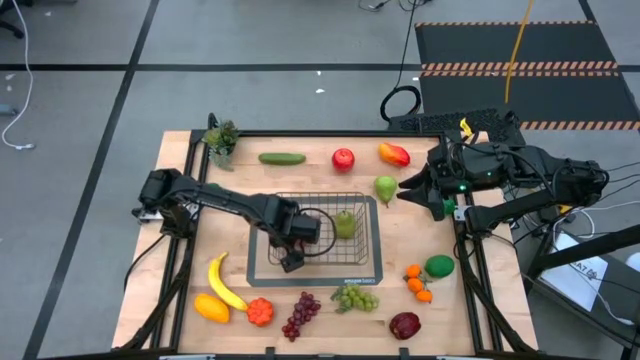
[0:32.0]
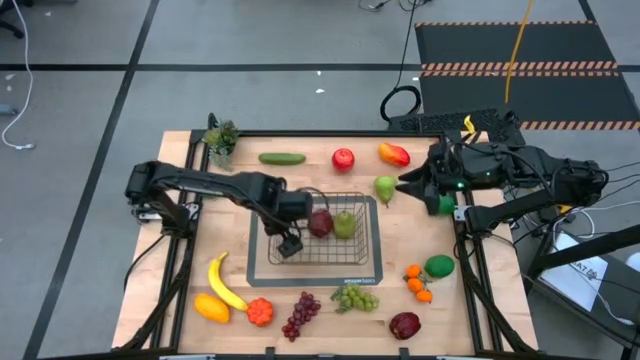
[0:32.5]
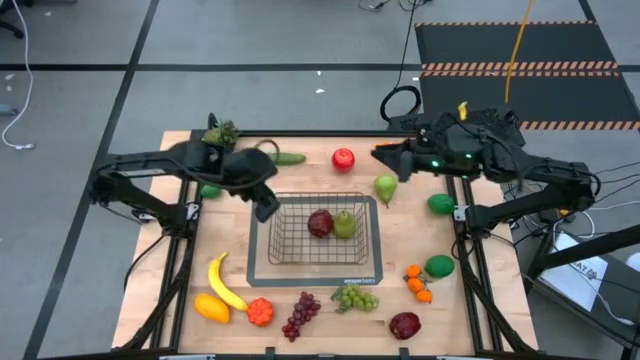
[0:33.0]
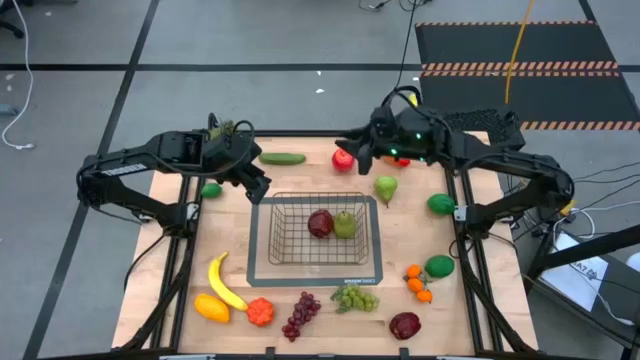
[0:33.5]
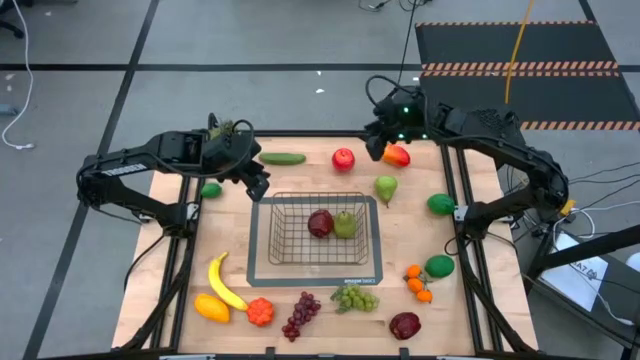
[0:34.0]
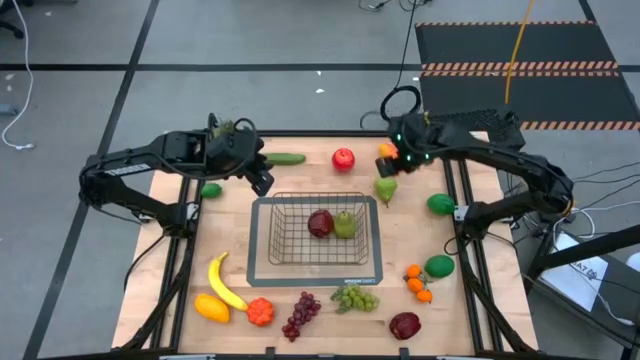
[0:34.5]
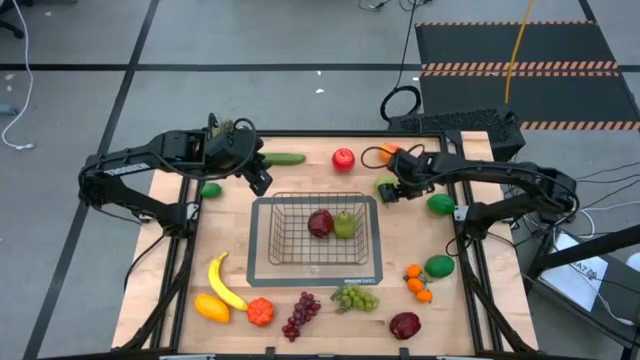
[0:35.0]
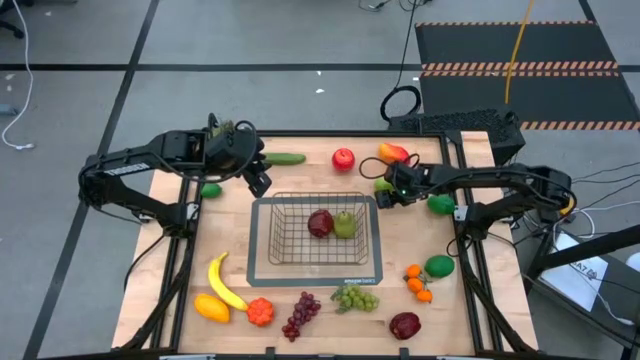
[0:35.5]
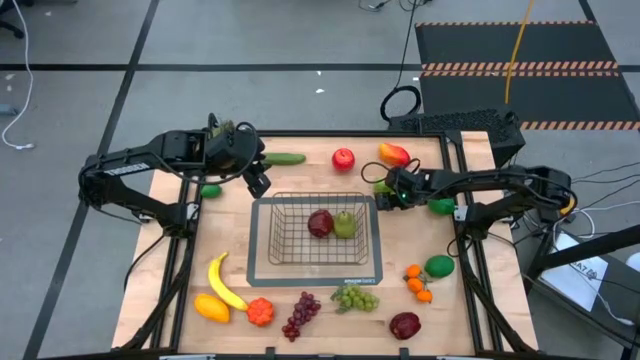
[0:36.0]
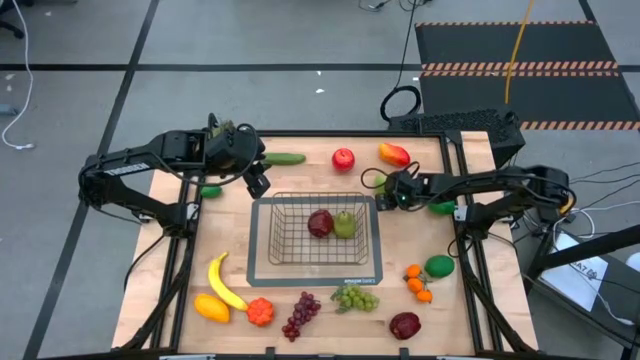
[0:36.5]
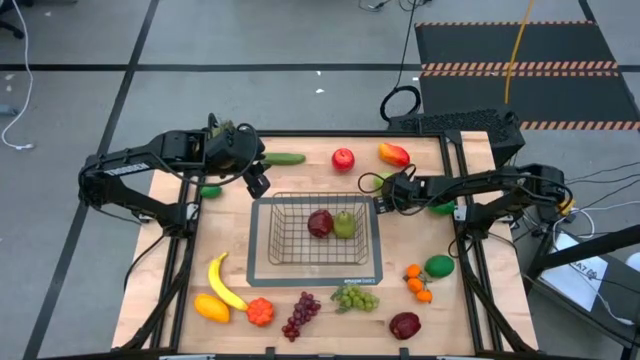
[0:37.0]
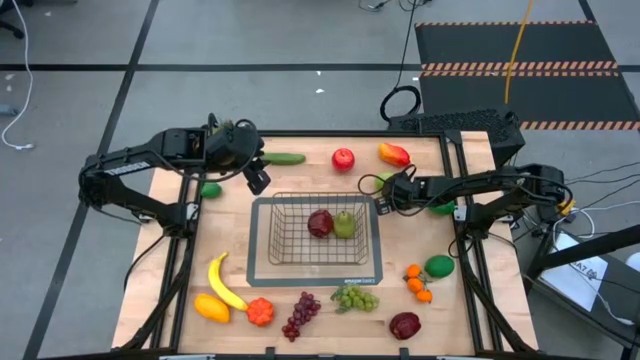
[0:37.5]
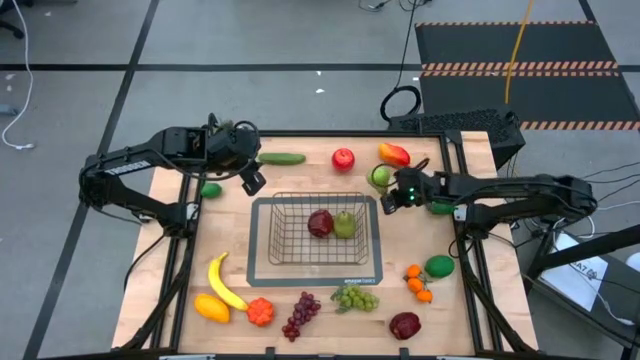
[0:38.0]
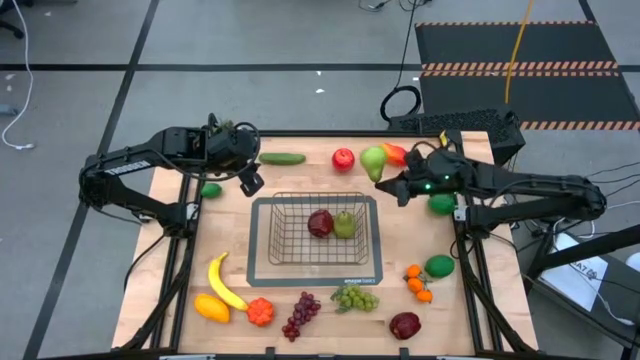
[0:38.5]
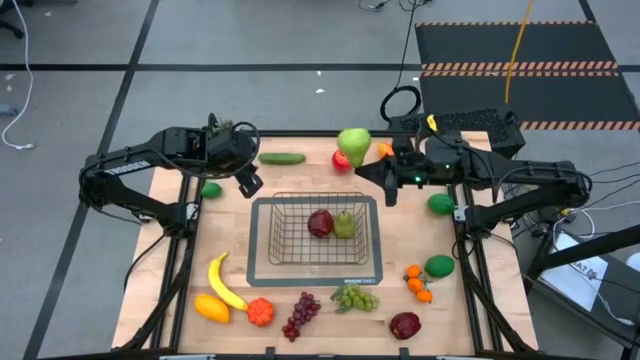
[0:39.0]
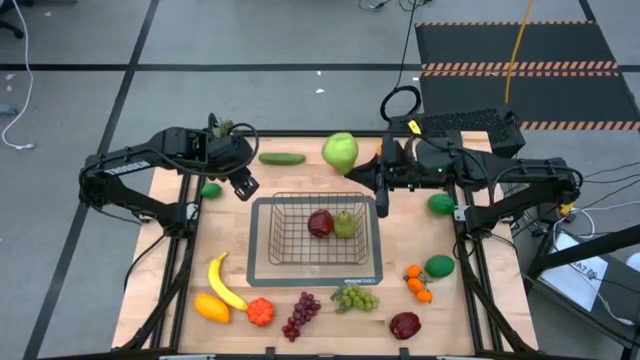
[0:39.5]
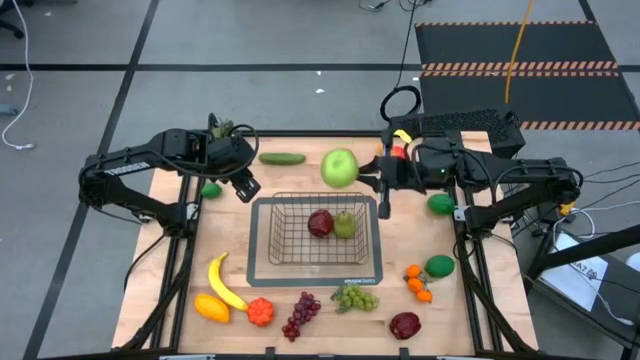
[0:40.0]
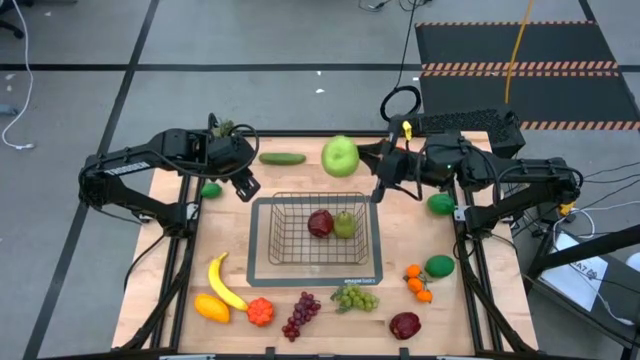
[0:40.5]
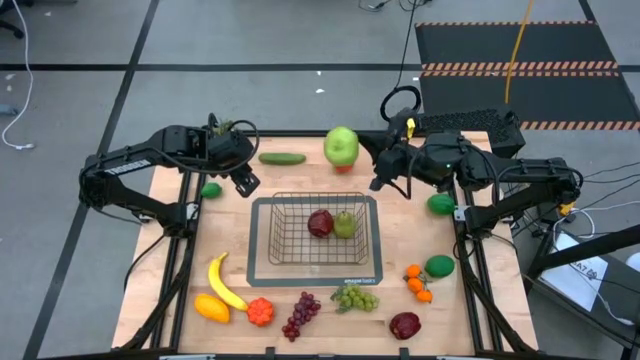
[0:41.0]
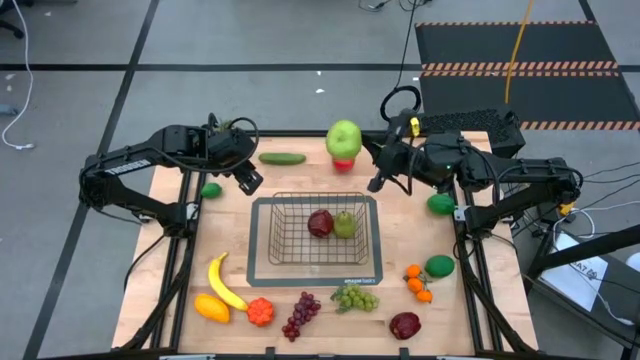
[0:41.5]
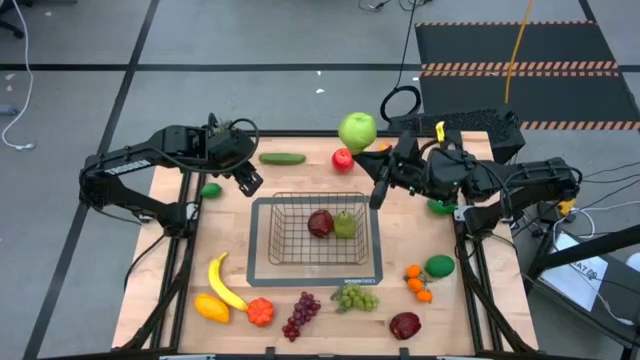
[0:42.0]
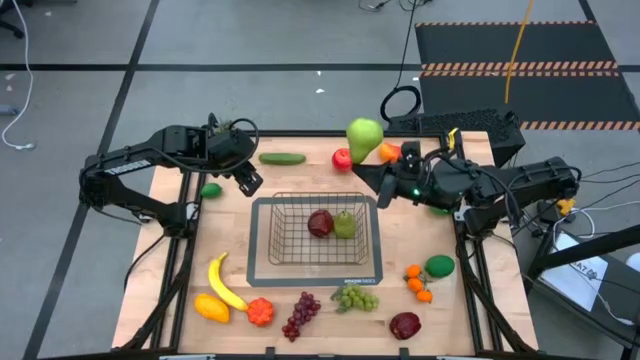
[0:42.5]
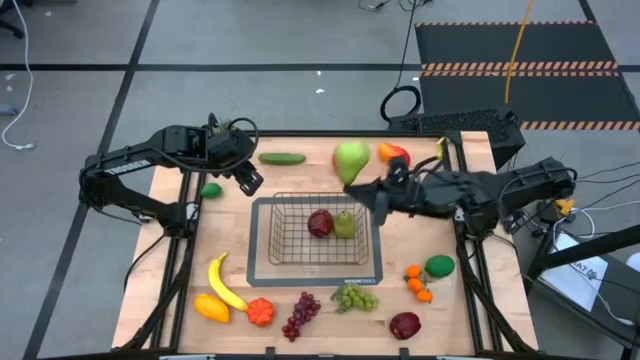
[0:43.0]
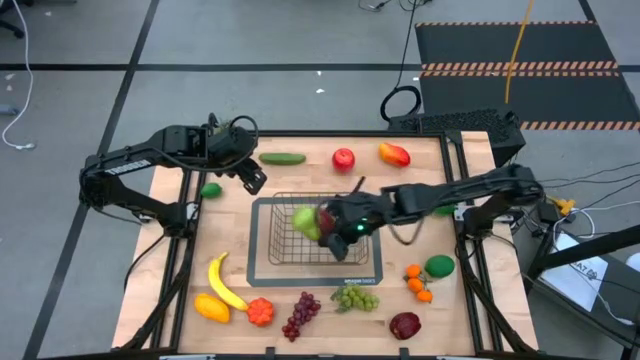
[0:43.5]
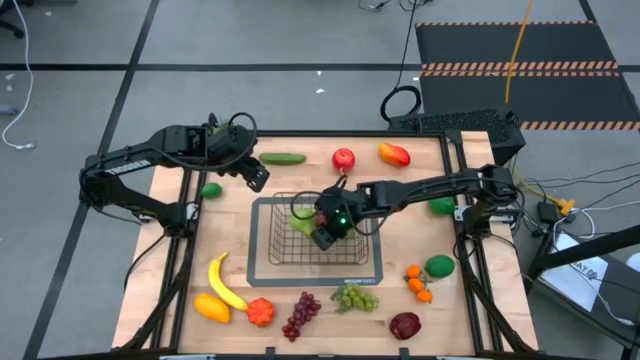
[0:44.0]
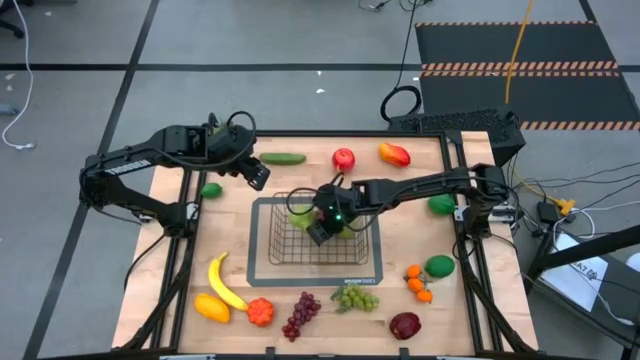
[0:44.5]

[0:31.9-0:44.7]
Task: Build produce basket
Put the green pear into the gold wire basket

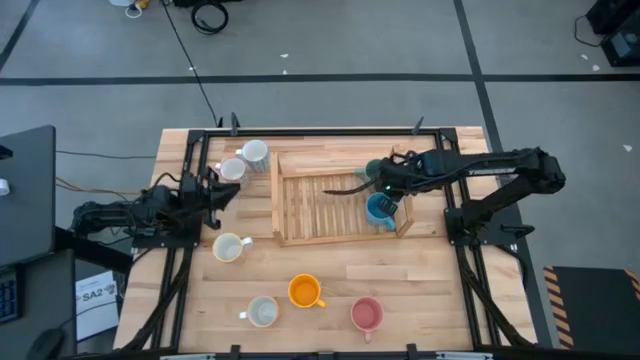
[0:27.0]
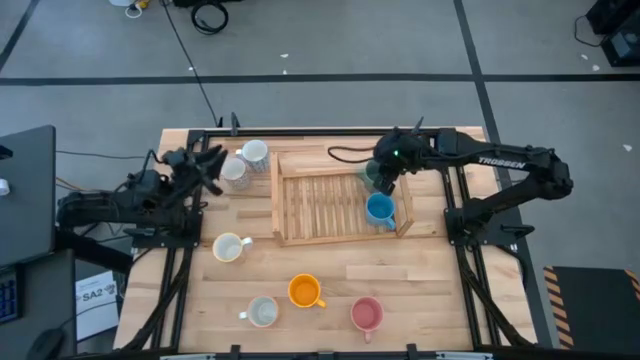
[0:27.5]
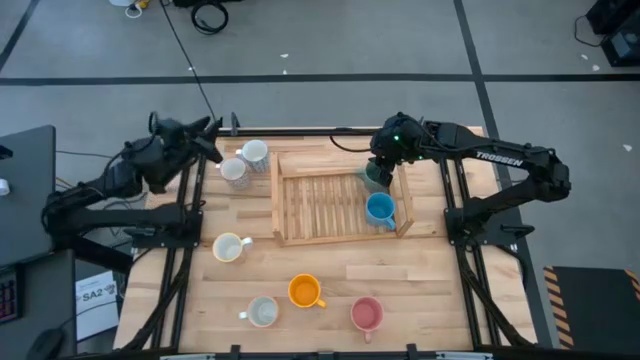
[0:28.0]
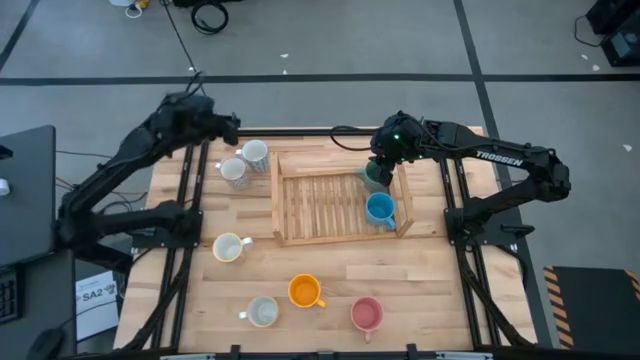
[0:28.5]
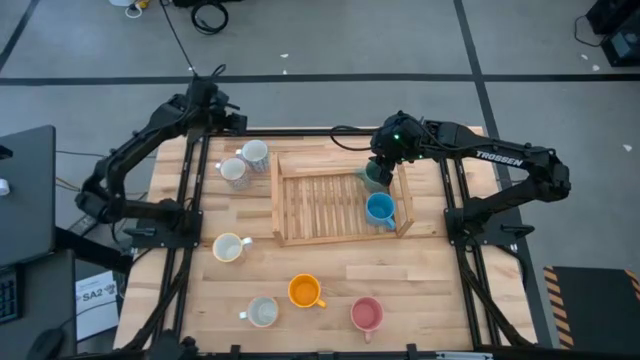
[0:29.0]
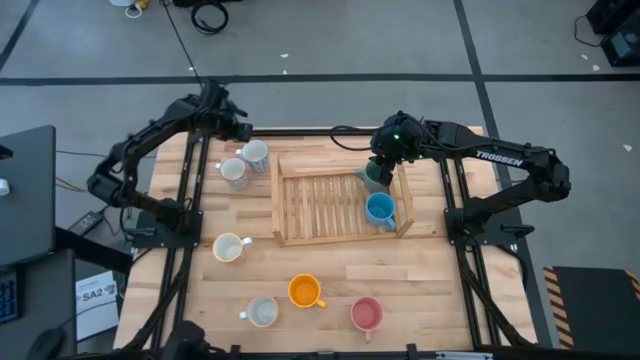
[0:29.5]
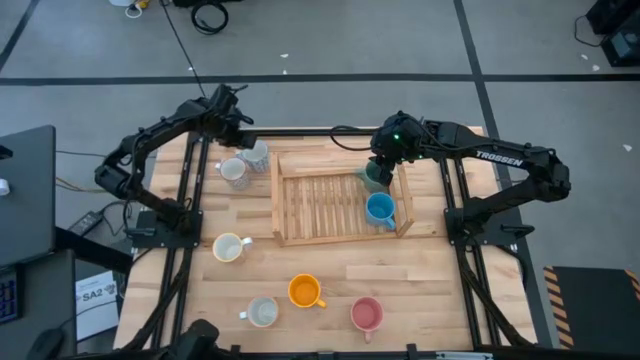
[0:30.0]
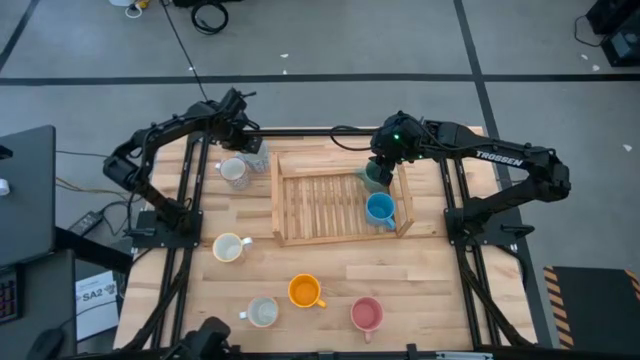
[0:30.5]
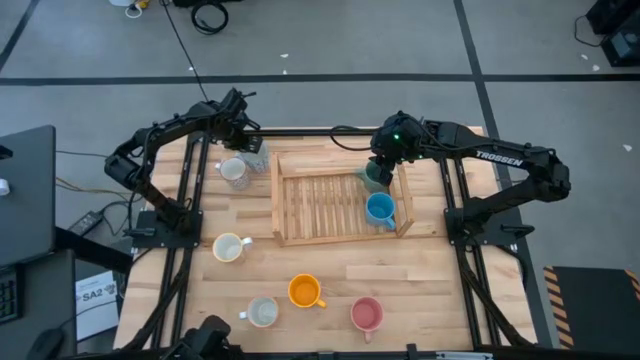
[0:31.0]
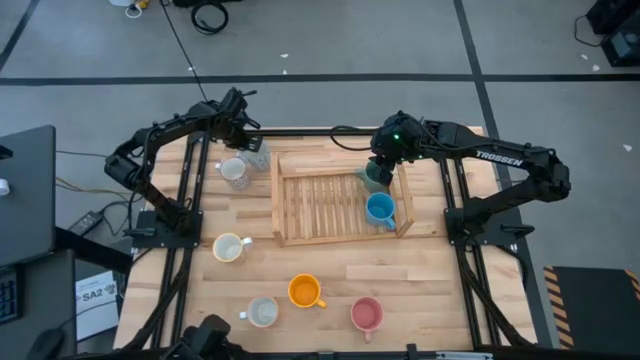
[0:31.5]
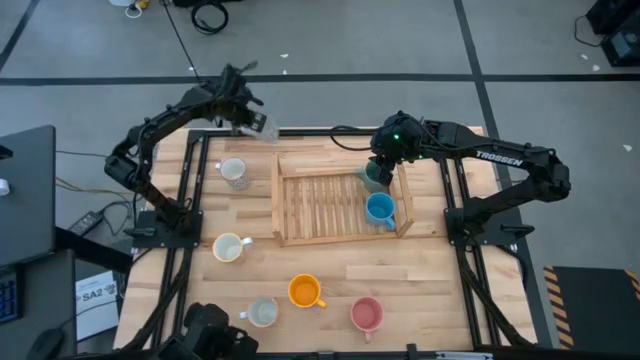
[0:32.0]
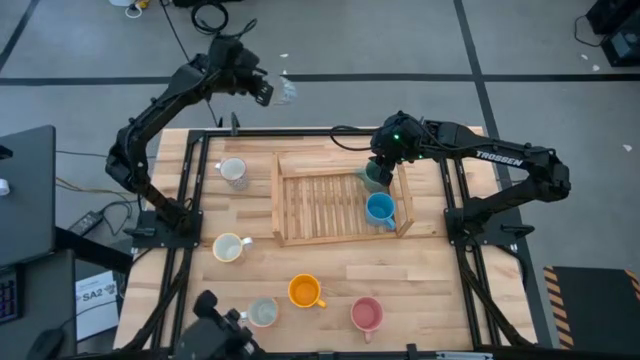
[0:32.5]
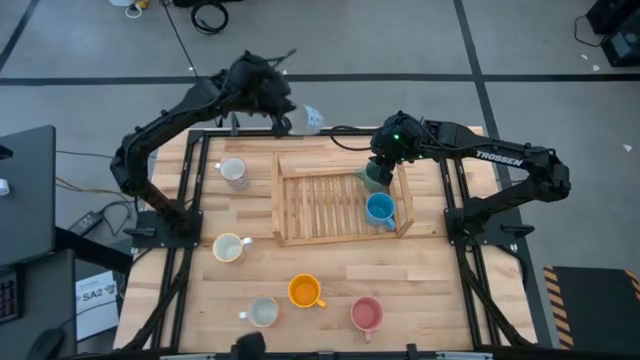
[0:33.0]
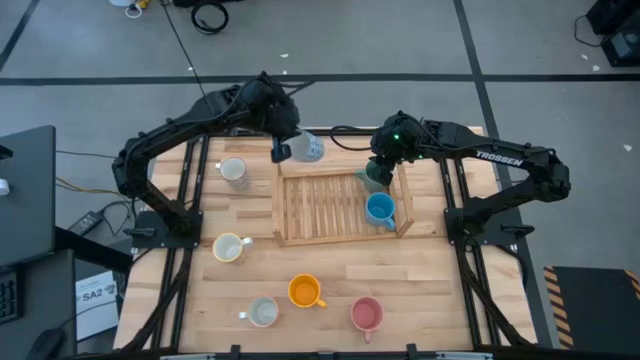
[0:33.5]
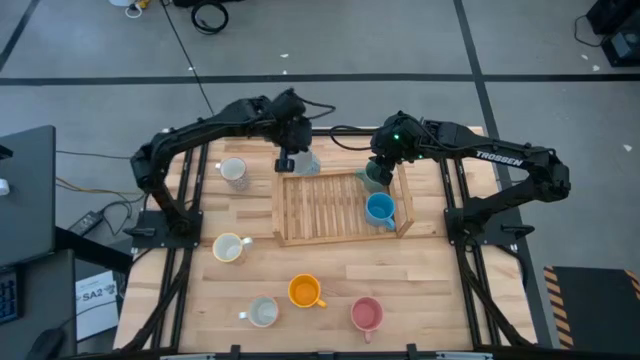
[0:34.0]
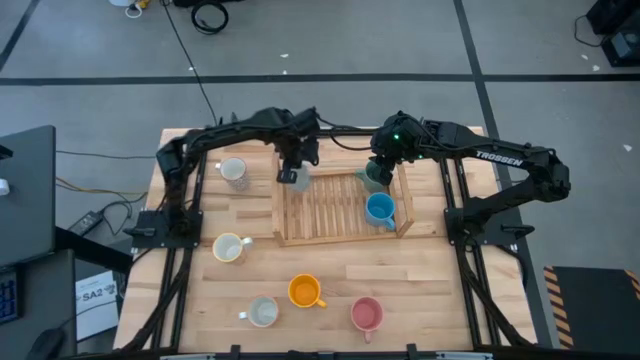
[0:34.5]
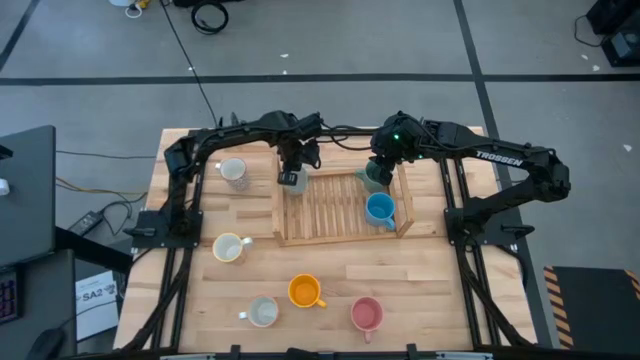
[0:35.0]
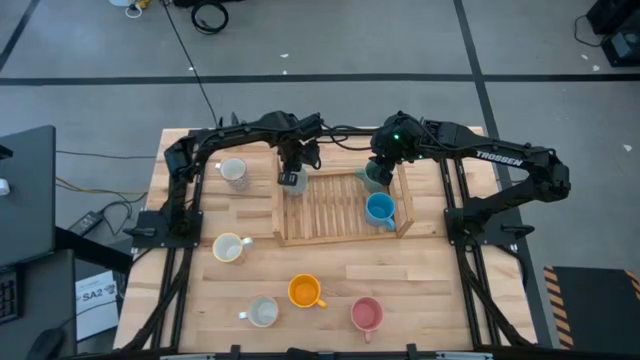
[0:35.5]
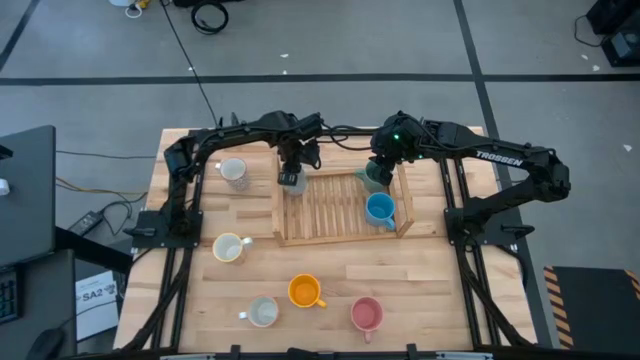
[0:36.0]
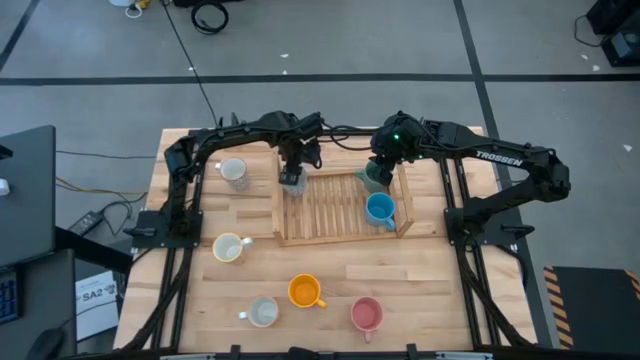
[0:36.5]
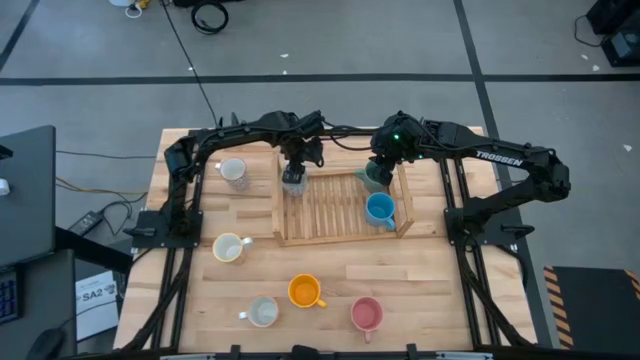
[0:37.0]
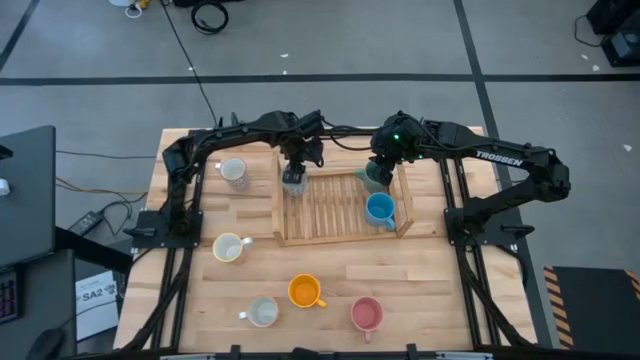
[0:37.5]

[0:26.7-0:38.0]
Task: Place coffee mugs
Put the blue cup on the shelf
